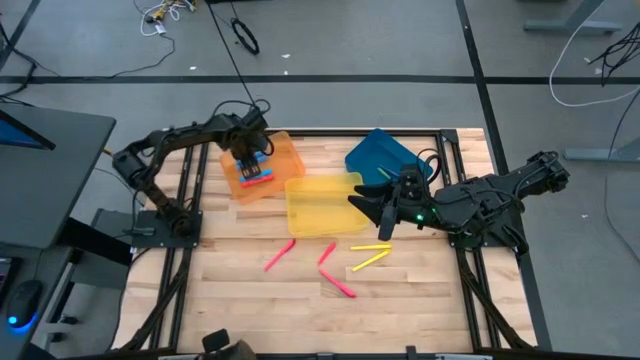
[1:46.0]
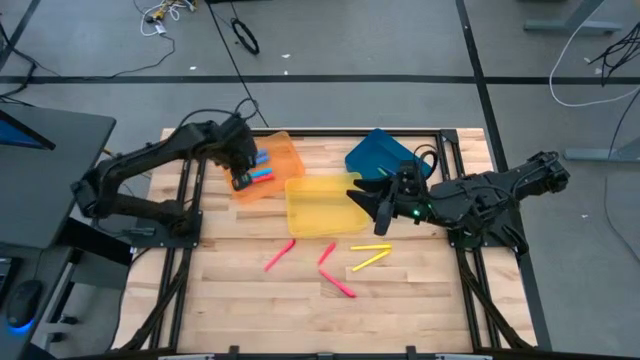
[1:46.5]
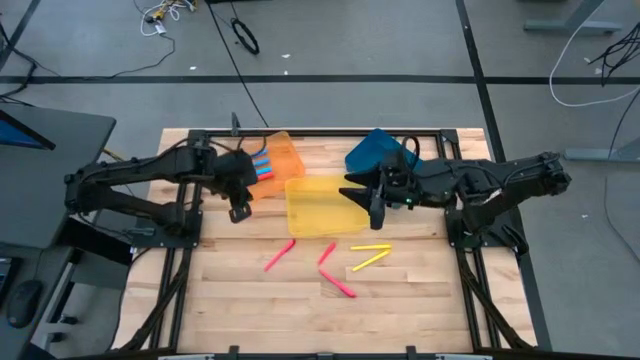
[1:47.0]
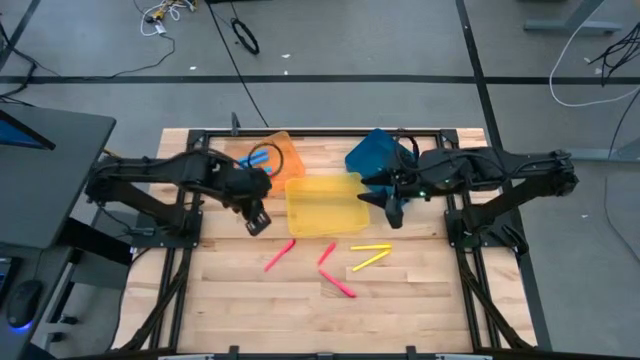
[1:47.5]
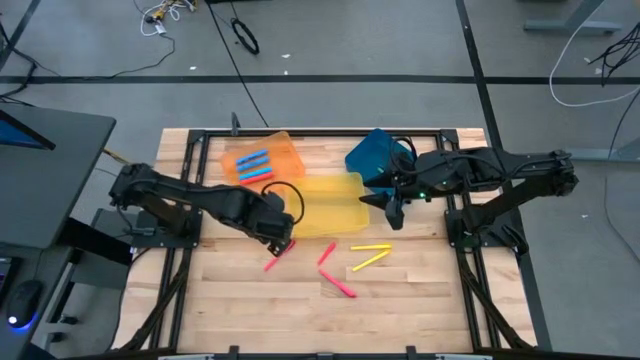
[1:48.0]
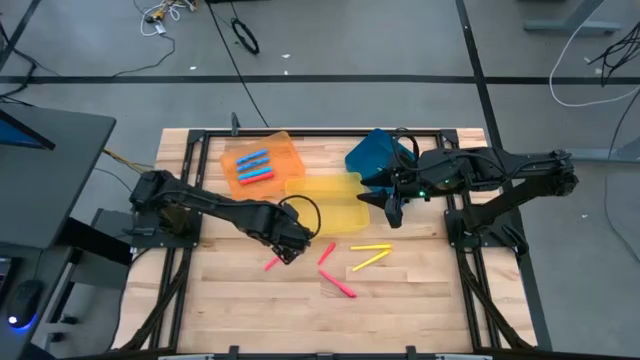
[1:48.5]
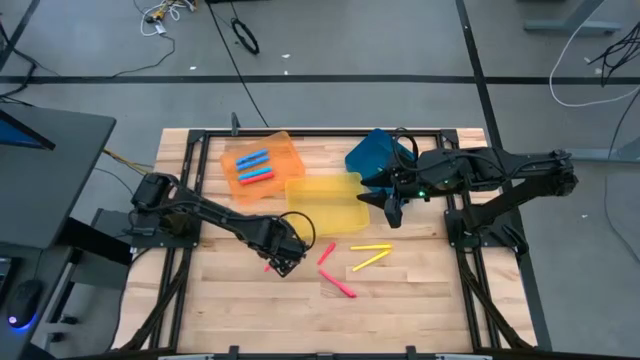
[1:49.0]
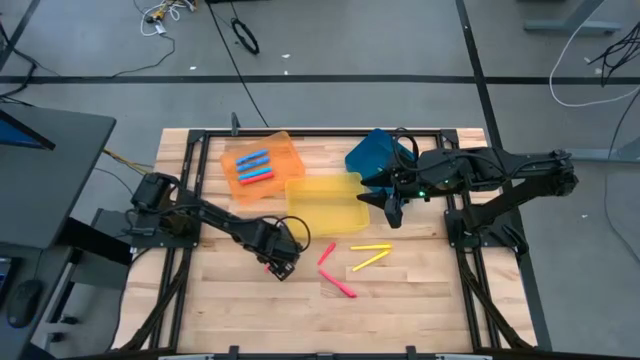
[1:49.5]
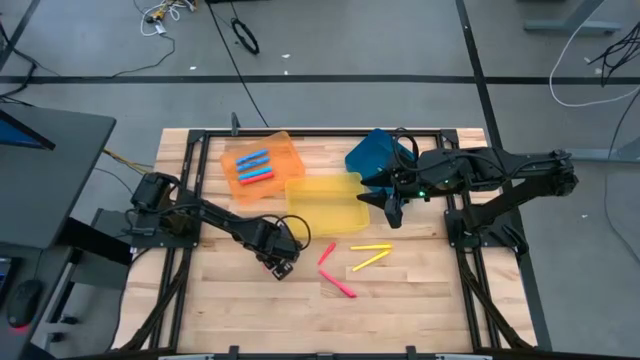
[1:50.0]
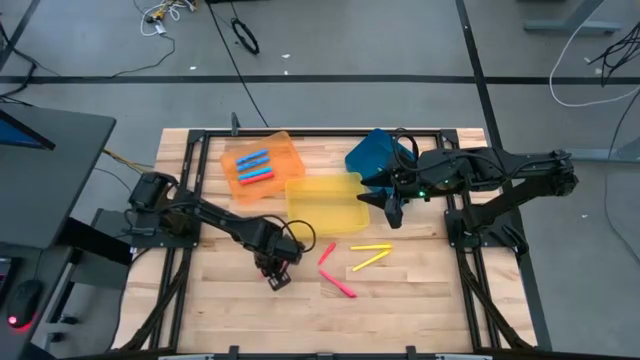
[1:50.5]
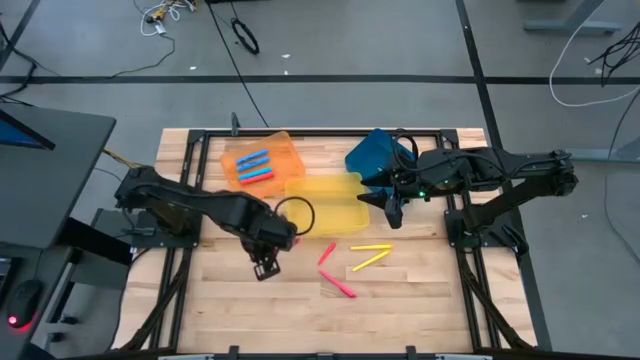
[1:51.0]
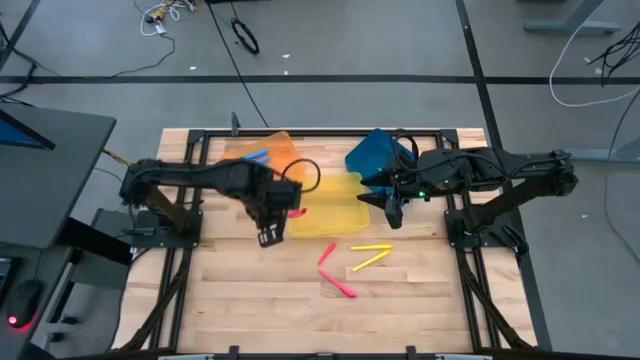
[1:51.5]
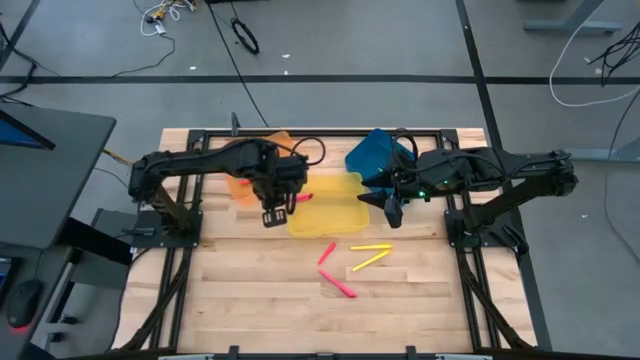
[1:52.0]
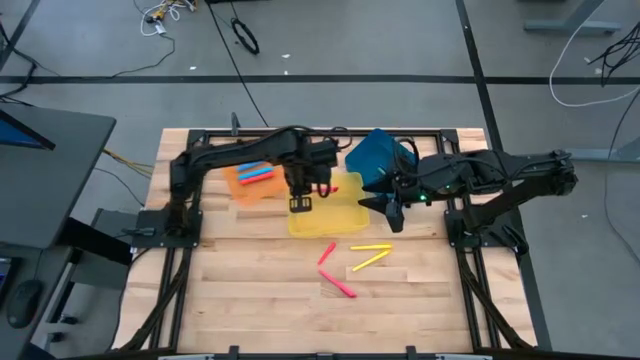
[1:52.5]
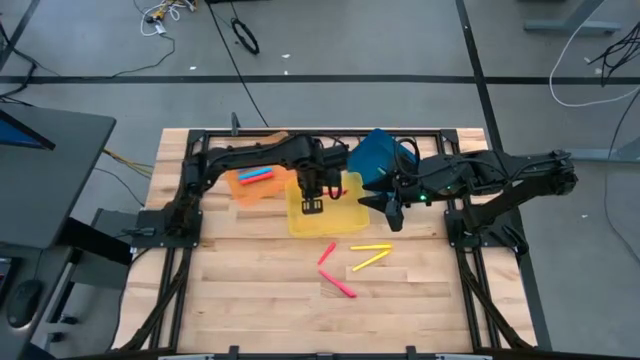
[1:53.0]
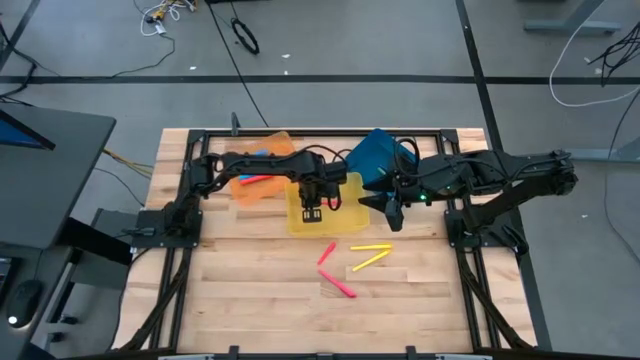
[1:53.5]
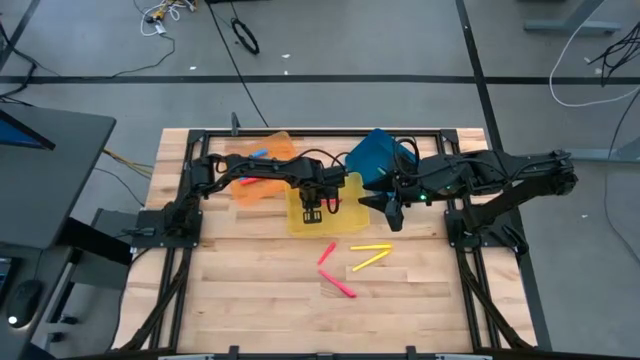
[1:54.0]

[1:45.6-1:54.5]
Task: Pick & Place Markers
Put the top pink marker pen into the yellow bin

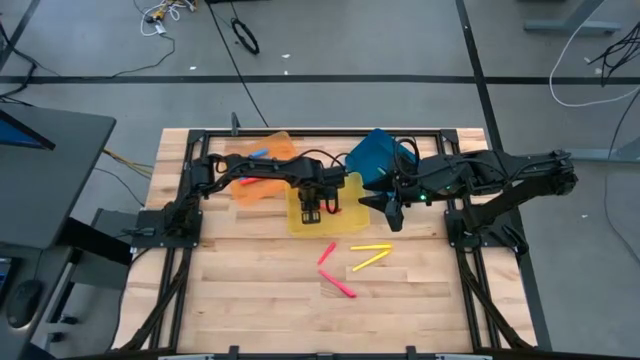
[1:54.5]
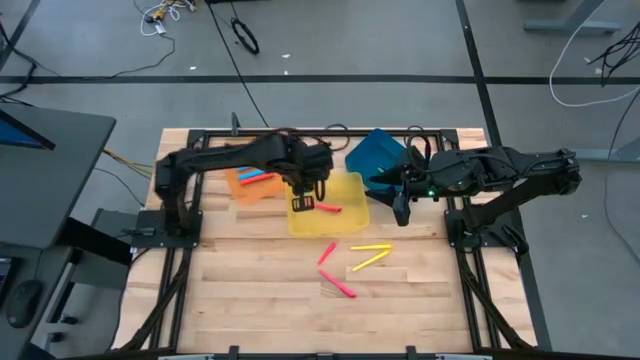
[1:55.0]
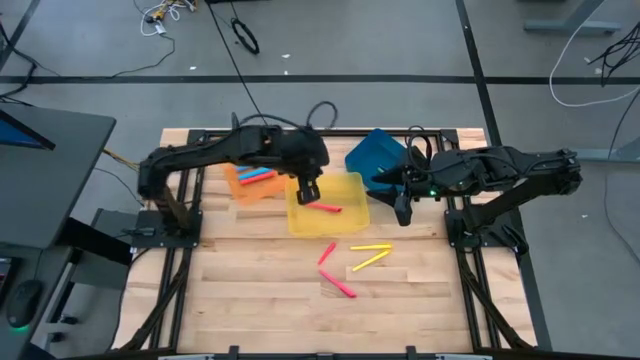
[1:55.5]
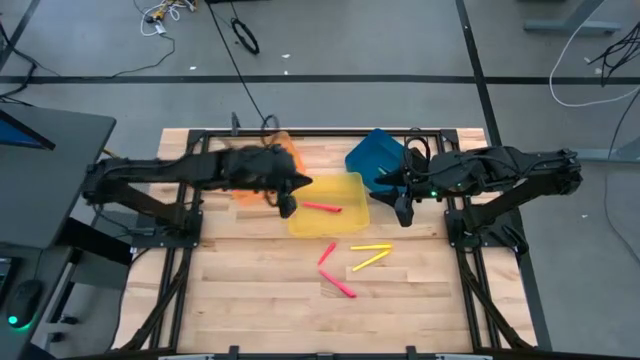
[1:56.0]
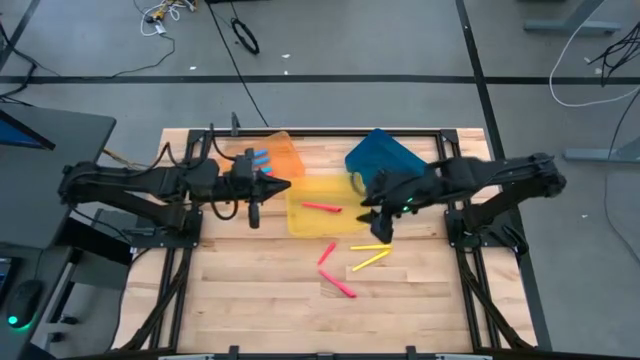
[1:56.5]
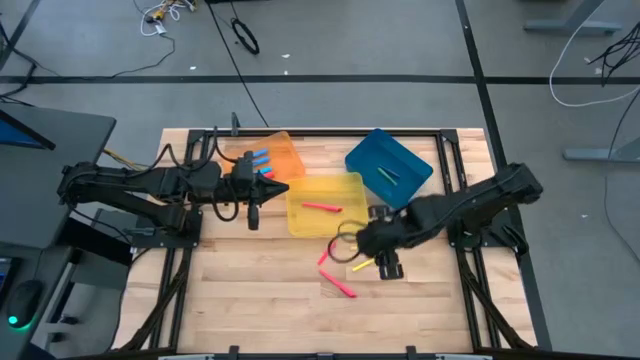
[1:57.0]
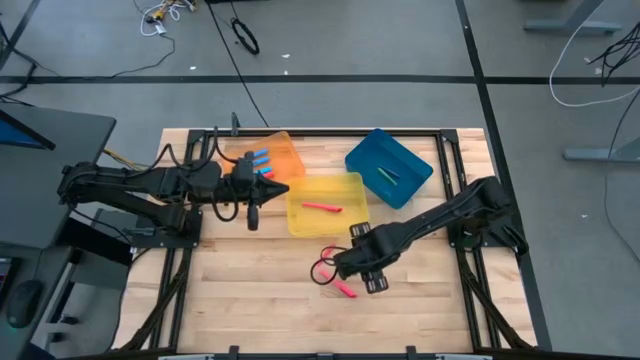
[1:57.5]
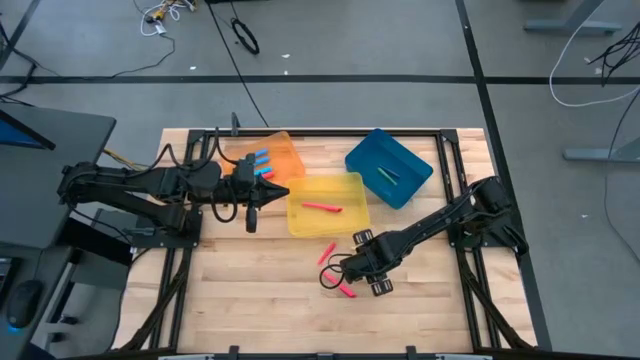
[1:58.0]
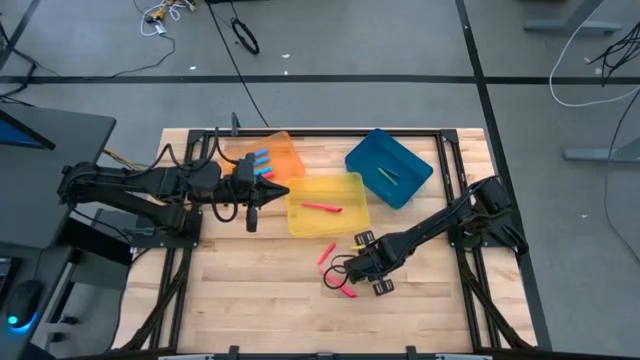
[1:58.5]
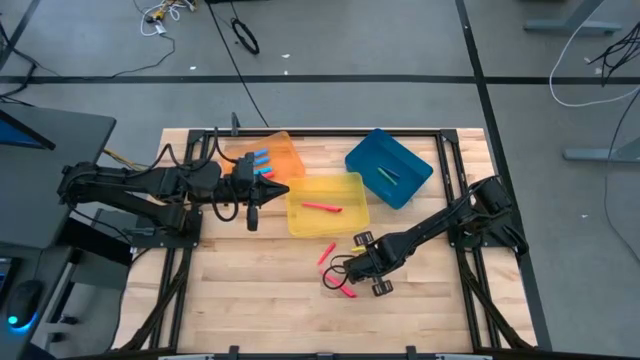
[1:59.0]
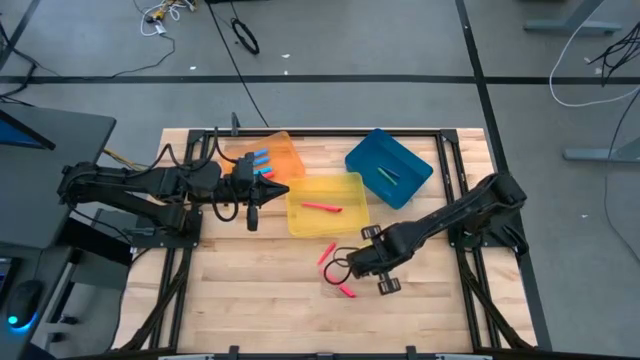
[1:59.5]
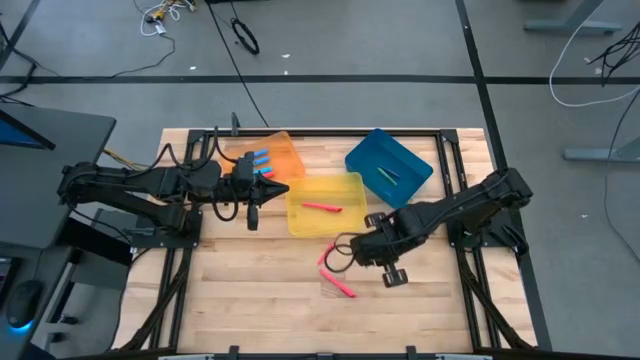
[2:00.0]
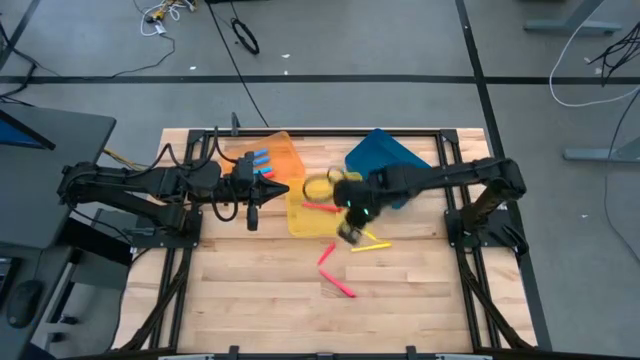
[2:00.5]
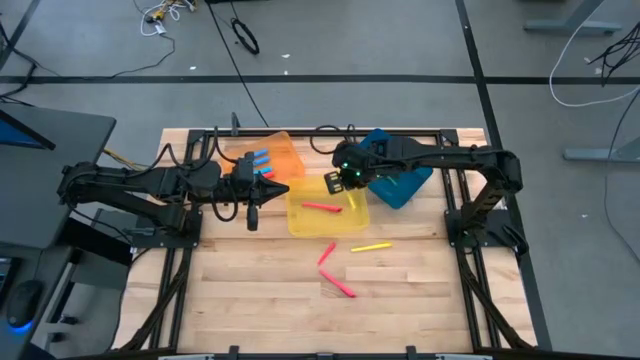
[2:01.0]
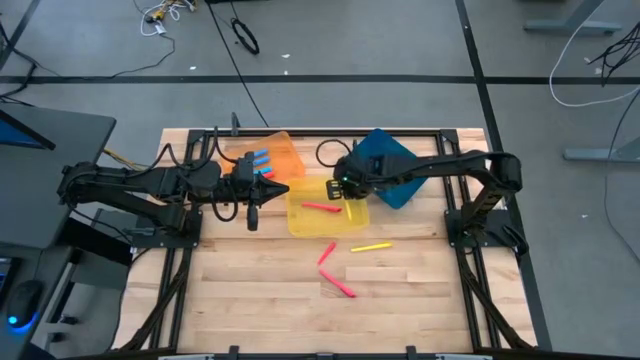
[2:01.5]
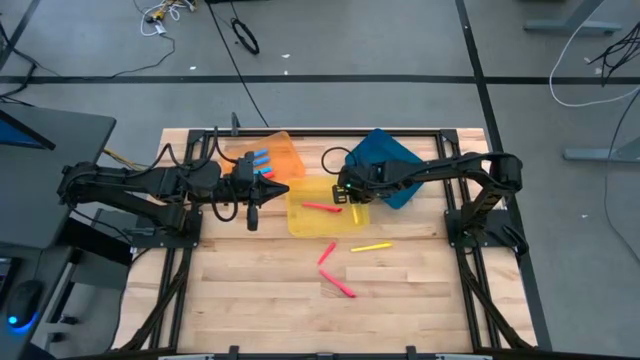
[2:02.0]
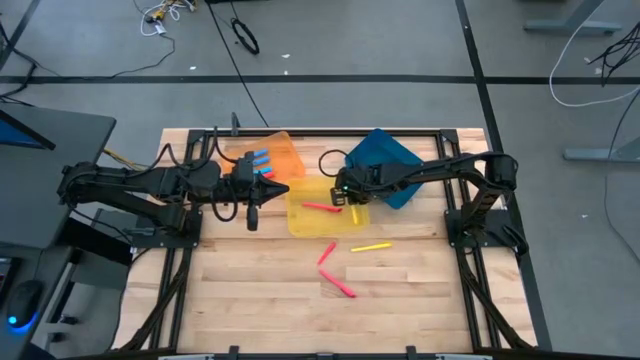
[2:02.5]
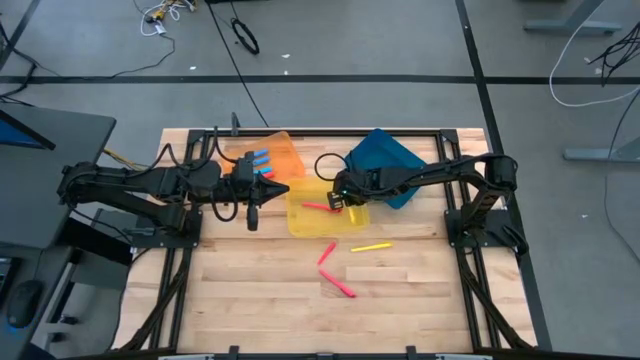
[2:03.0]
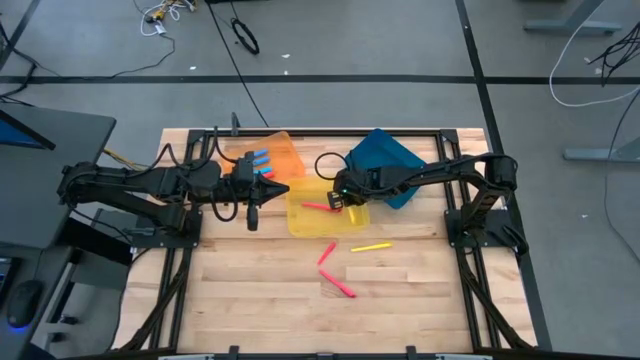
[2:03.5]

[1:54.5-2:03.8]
Put the bottom yellow marker pen into the yellow bin
